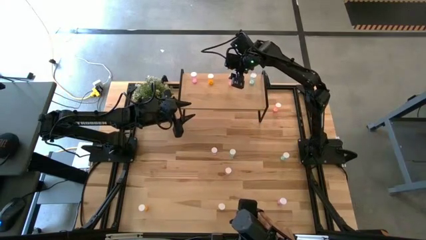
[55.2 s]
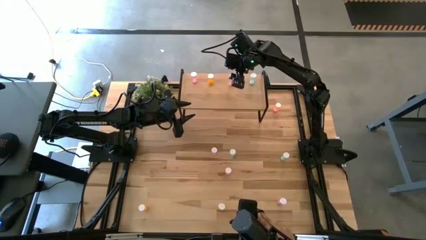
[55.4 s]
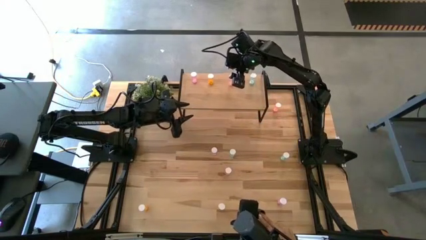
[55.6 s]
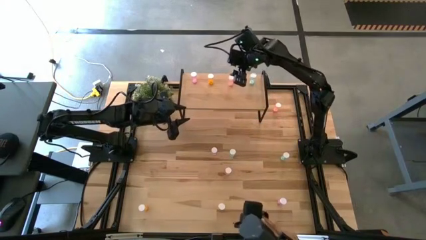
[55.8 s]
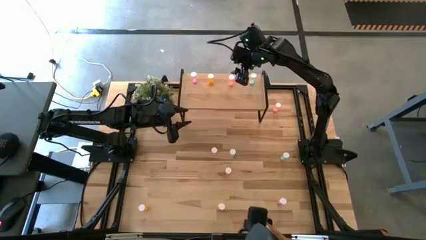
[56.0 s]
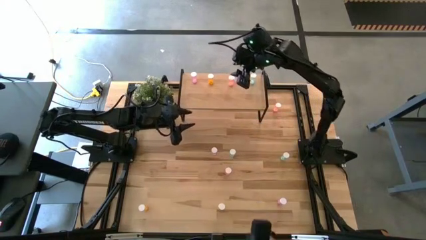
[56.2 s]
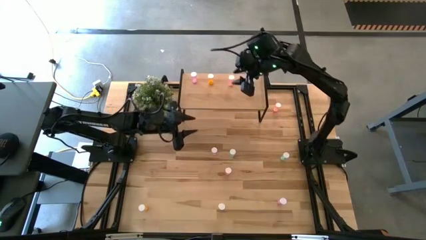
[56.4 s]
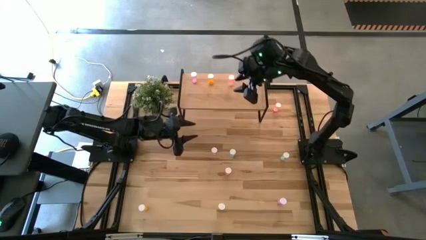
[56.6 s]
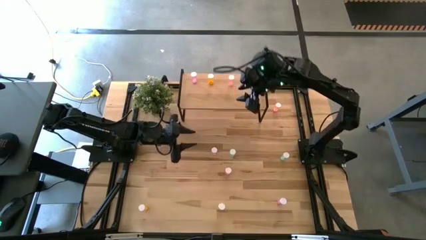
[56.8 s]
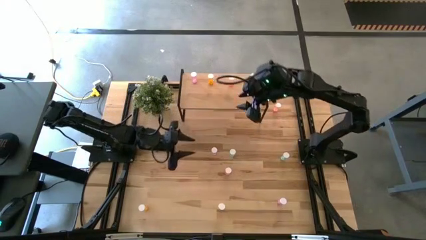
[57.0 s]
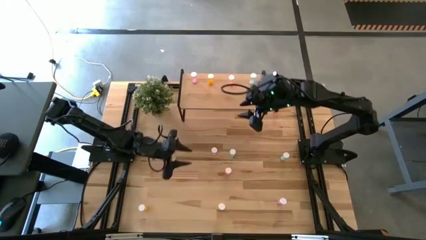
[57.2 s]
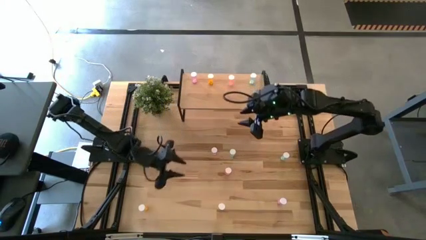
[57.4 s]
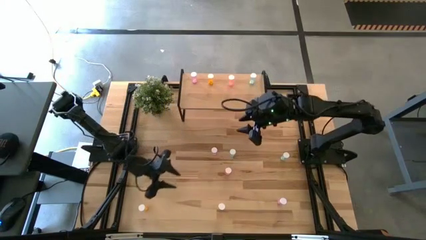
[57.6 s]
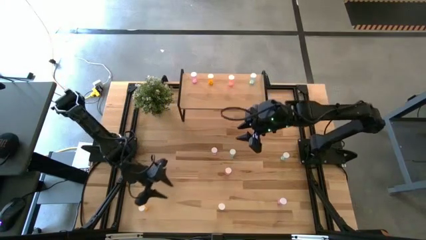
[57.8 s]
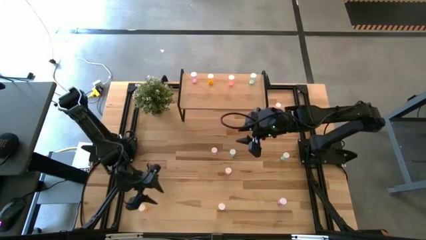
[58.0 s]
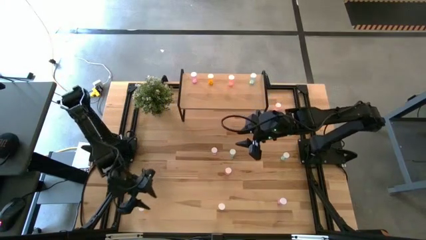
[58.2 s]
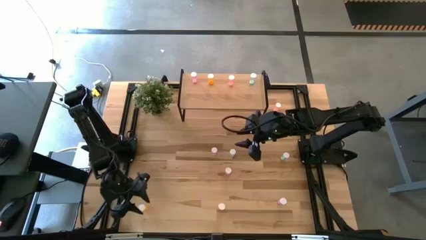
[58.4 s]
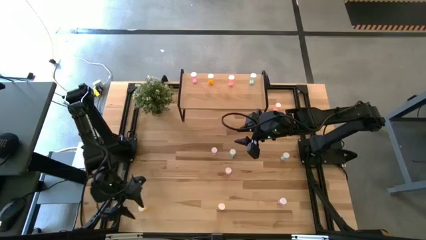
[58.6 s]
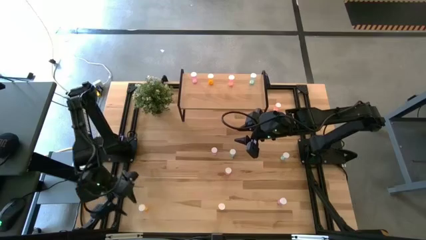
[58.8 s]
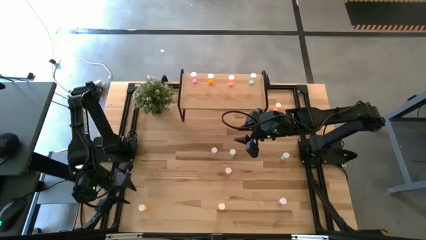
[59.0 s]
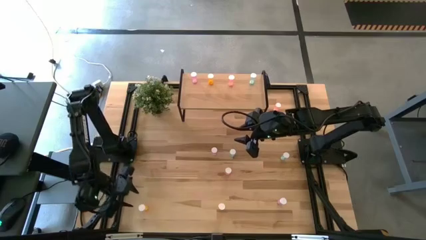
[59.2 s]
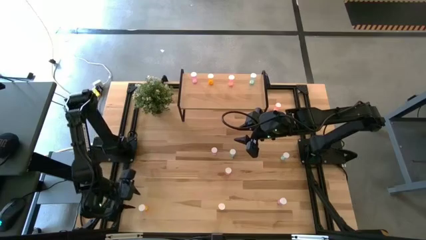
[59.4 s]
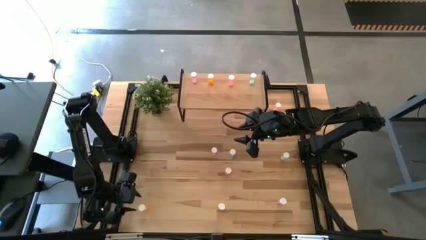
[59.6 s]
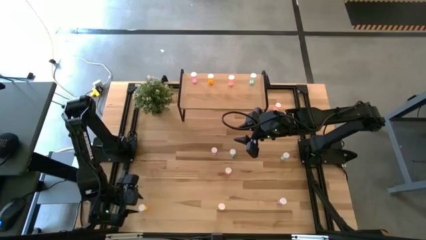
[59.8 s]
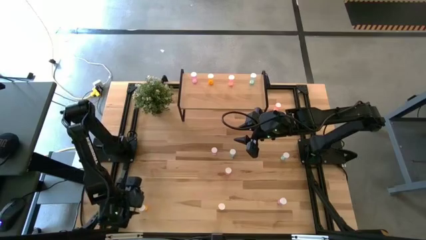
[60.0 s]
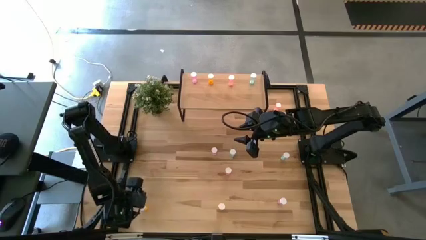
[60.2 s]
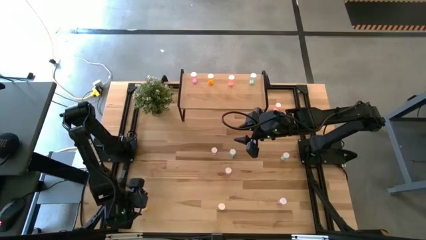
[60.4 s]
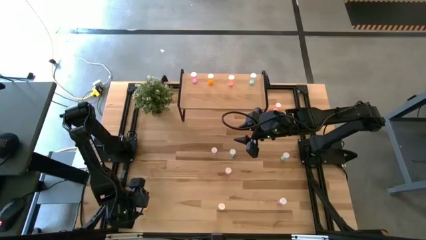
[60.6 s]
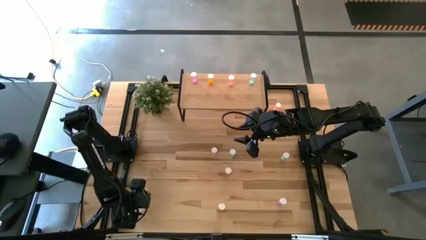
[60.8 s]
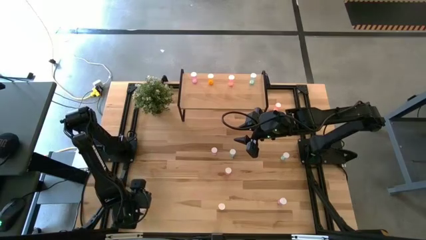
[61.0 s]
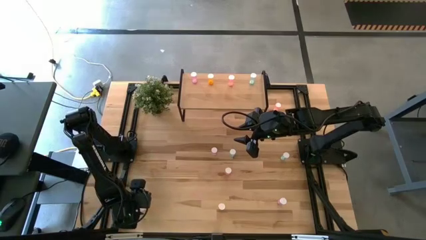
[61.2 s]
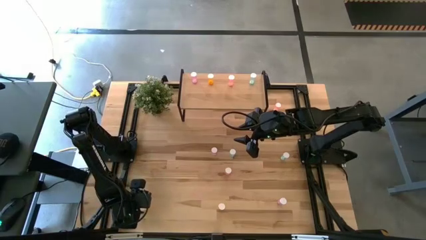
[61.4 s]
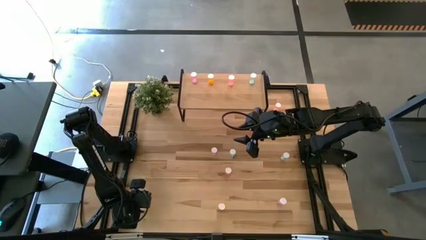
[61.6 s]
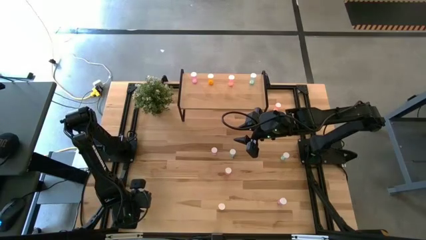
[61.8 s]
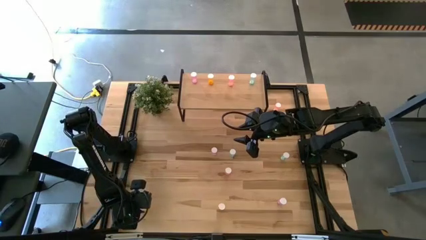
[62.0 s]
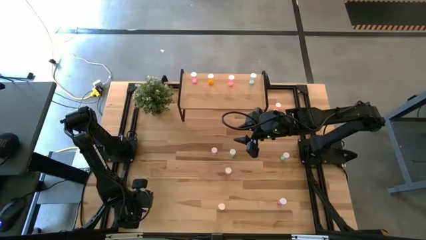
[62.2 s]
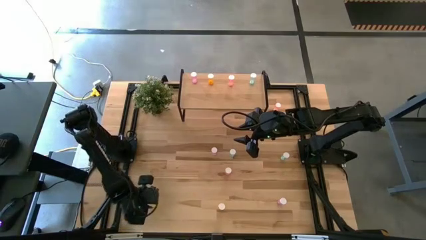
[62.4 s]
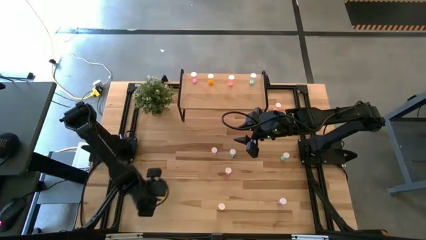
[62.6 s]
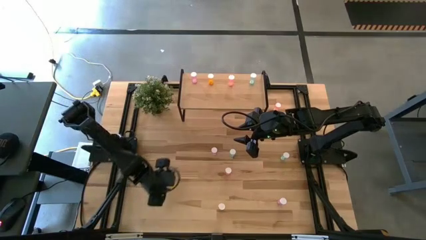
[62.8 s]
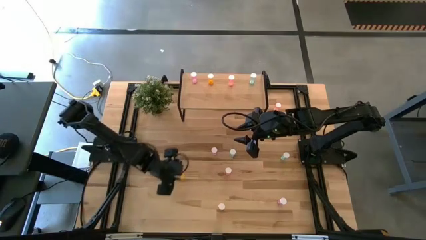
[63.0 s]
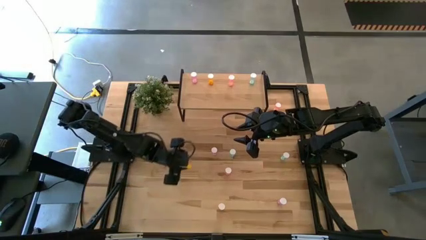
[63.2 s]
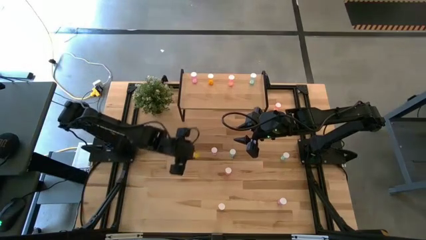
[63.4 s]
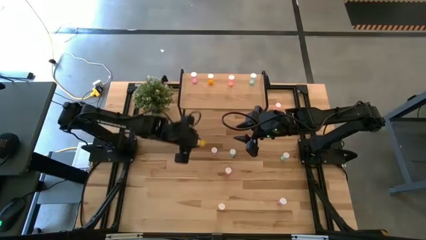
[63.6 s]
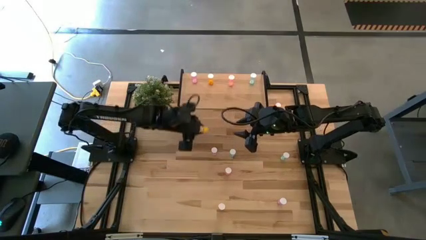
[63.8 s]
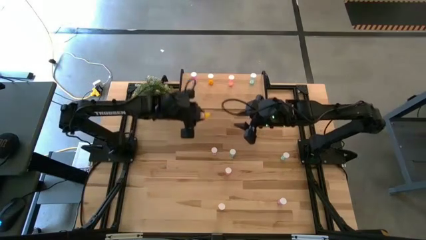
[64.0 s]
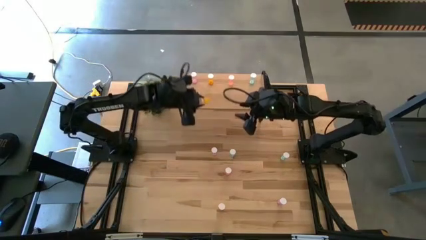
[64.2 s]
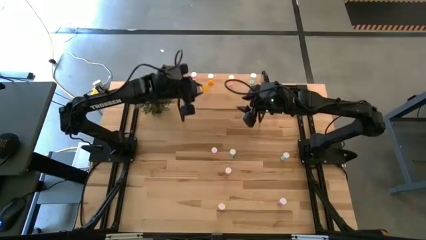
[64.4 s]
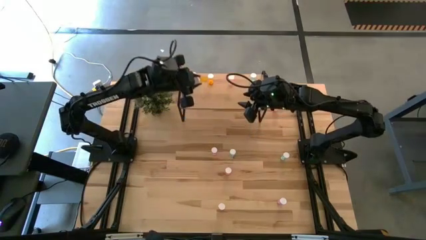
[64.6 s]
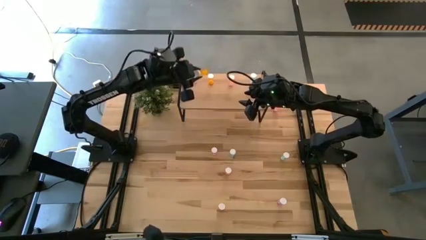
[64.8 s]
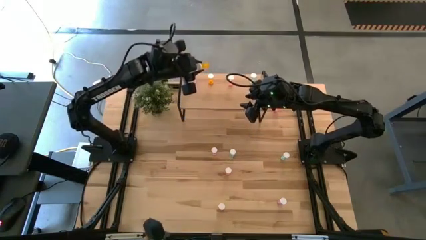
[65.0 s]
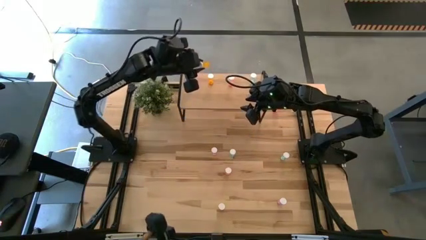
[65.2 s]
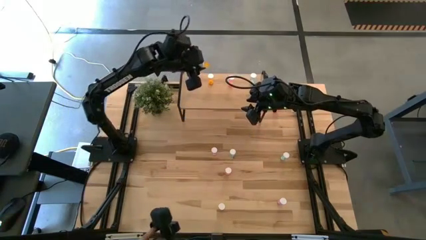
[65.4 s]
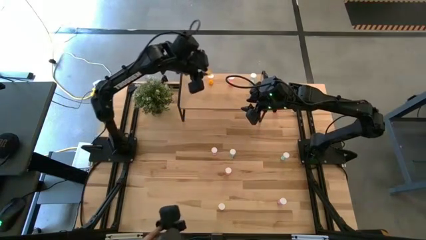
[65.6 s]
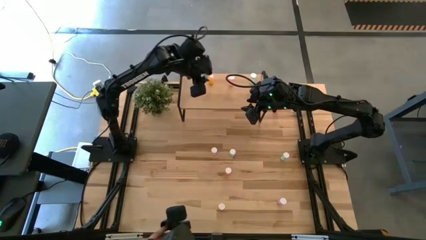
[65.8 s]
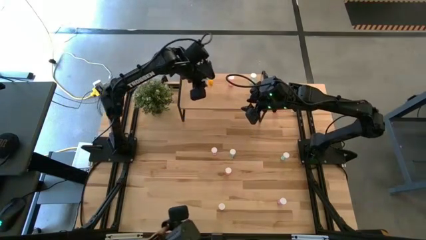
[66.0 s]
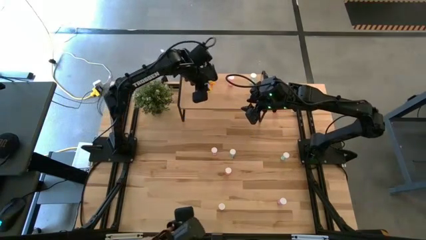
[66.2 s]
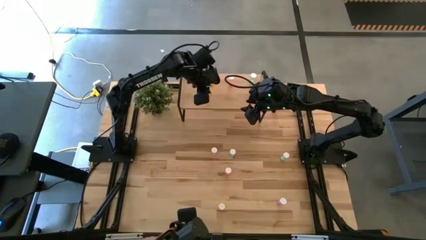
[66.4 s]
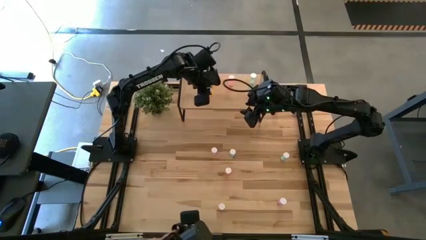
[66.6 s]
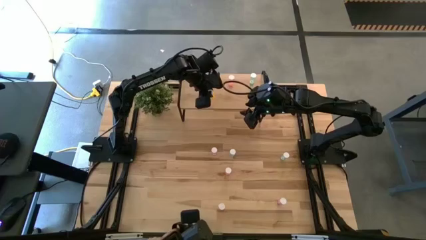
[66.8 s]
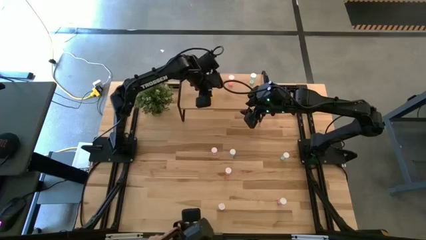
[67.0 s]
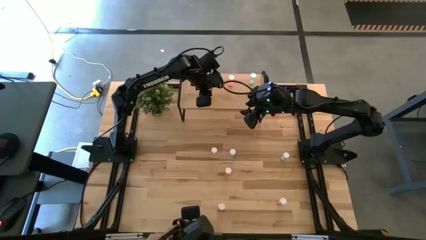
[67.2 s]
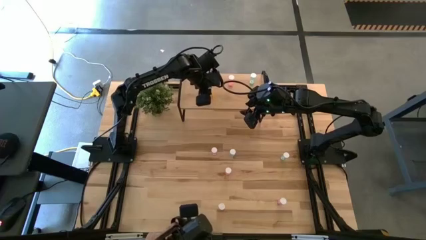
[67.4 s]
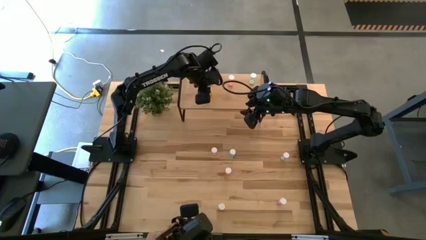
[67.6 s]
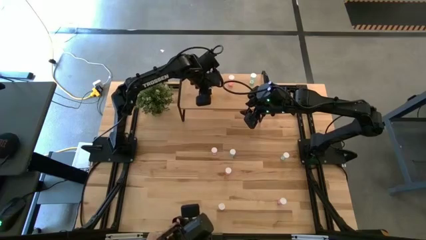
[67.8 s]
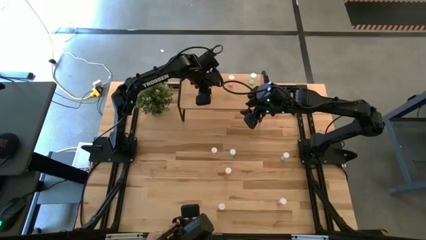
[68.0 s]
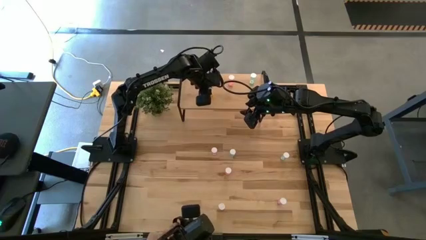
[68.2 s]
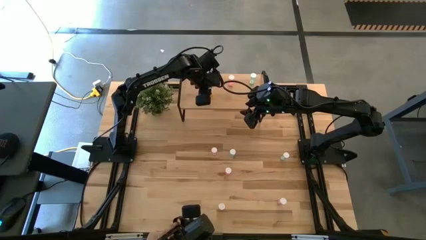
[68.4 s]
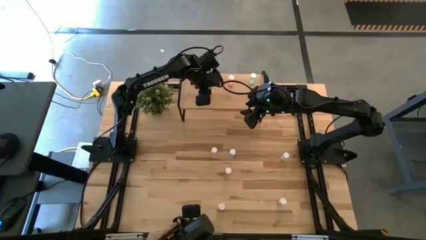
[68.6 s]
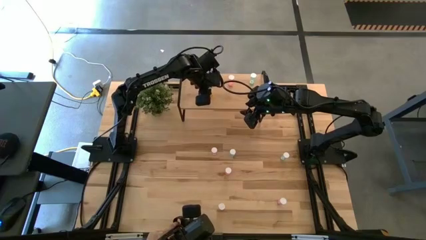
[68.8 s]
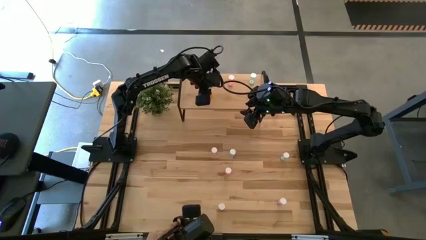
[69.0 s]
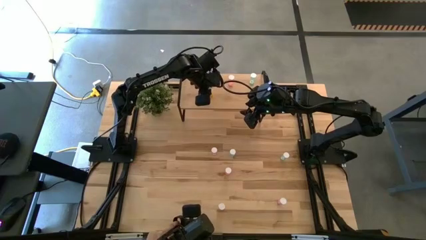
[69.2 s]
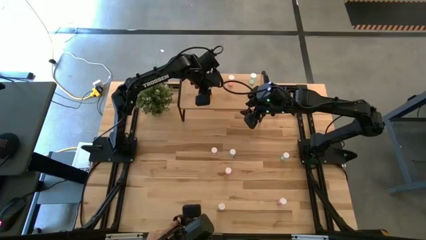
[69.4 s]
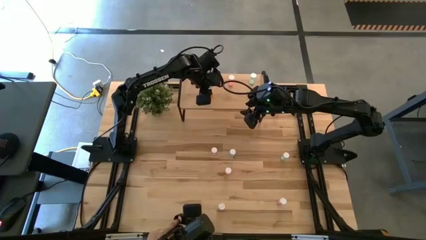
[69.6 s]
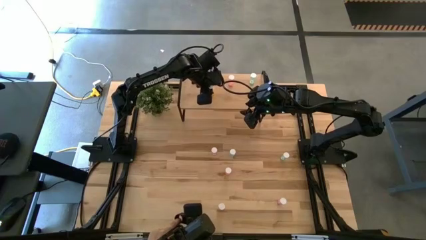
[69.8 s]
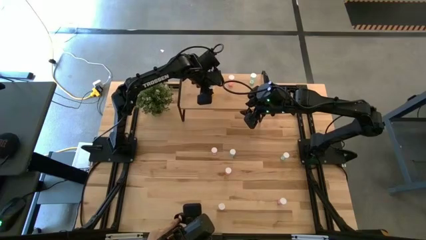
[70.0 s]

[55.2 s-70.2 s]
Task: Pick and place medicine bottles onto shelf by color
Put the left orange pill bottle aligned with the other orange pill bottle on the shelf
